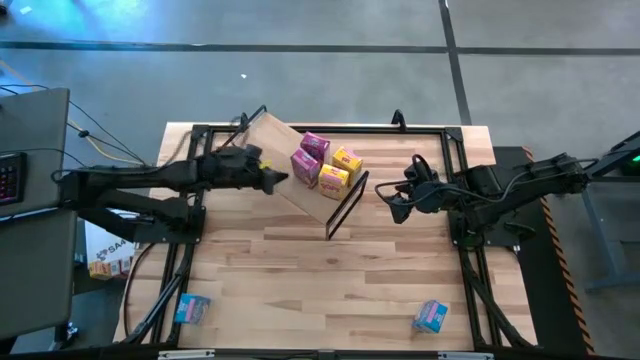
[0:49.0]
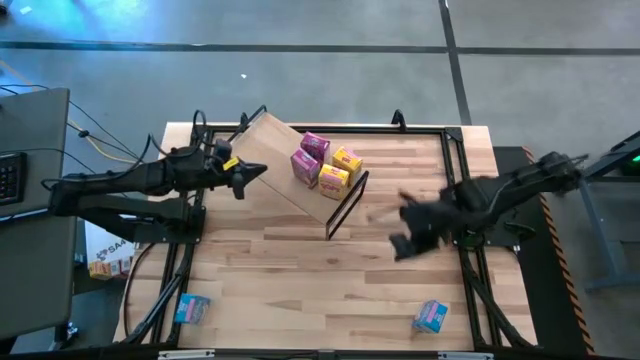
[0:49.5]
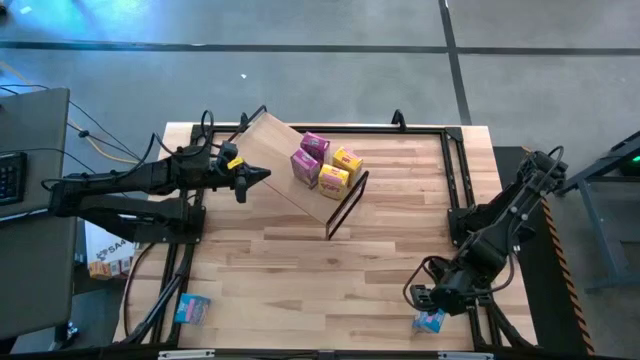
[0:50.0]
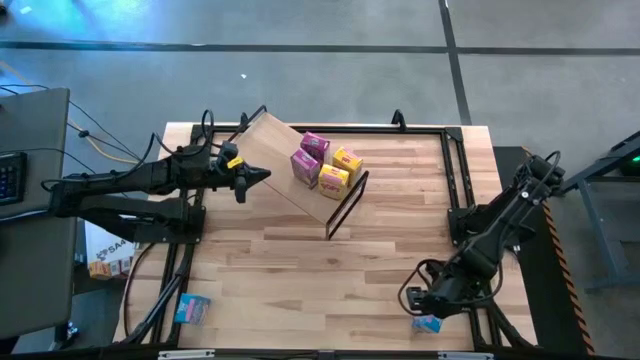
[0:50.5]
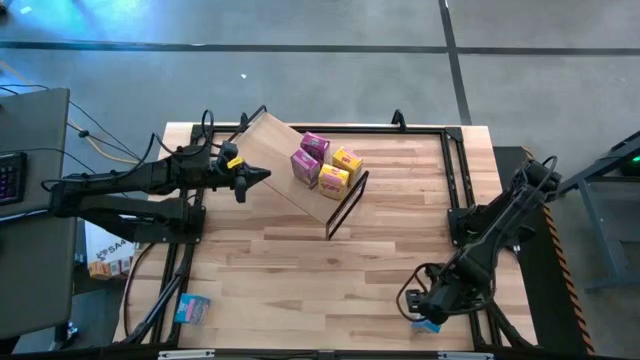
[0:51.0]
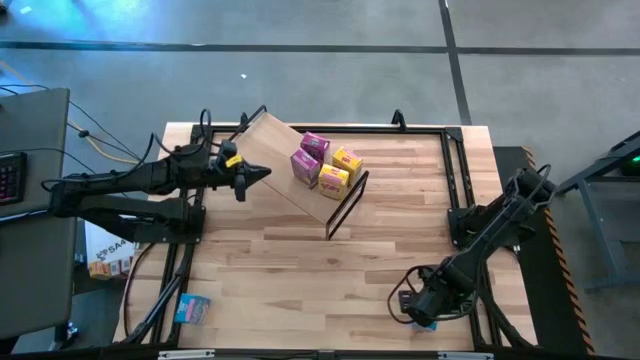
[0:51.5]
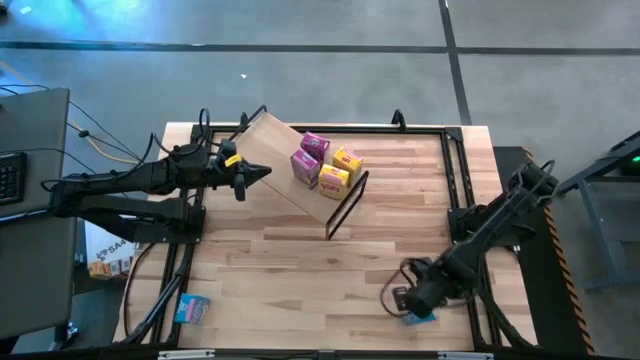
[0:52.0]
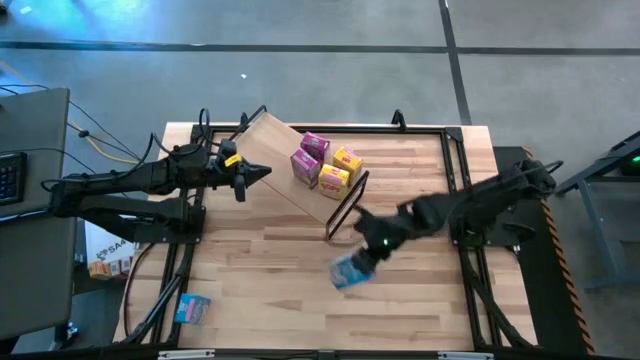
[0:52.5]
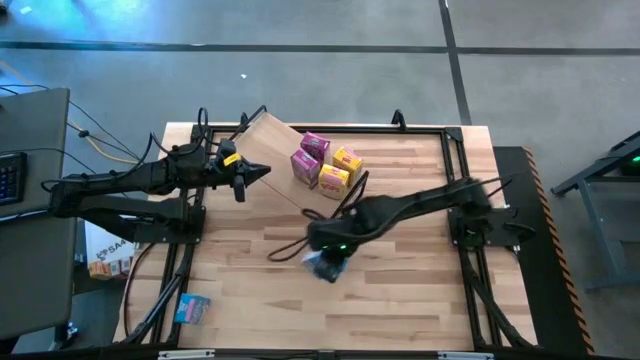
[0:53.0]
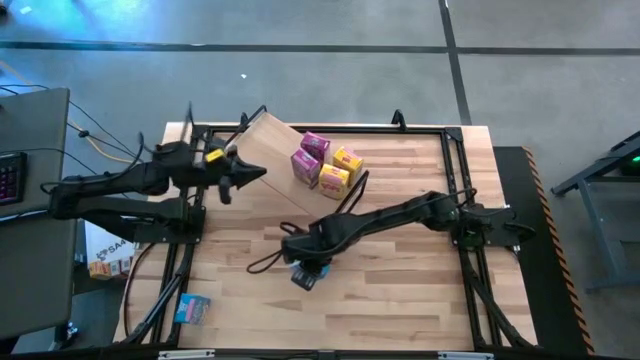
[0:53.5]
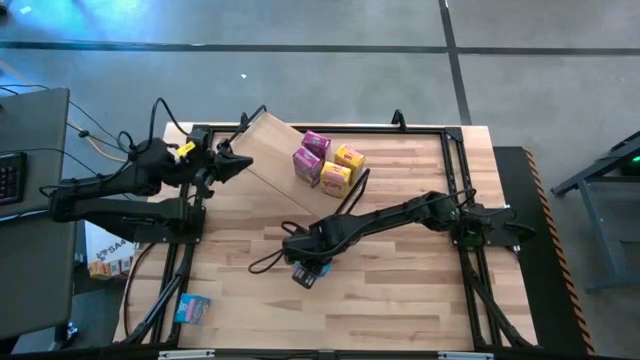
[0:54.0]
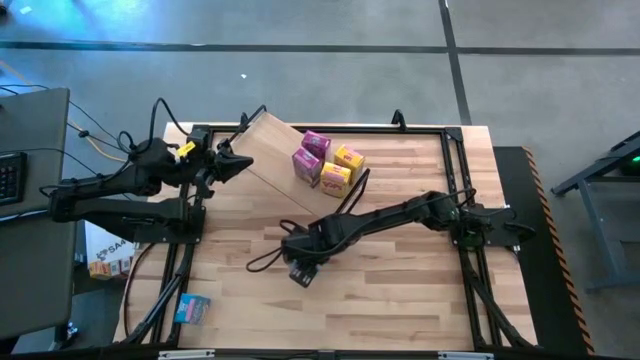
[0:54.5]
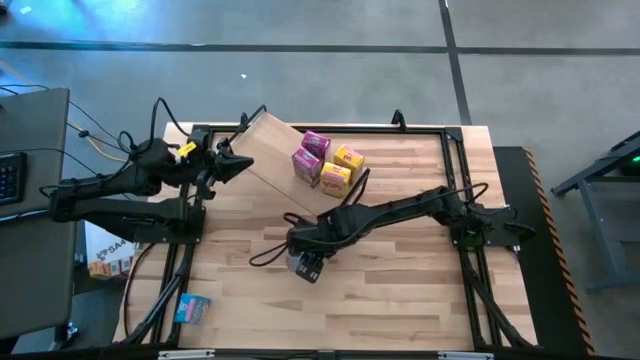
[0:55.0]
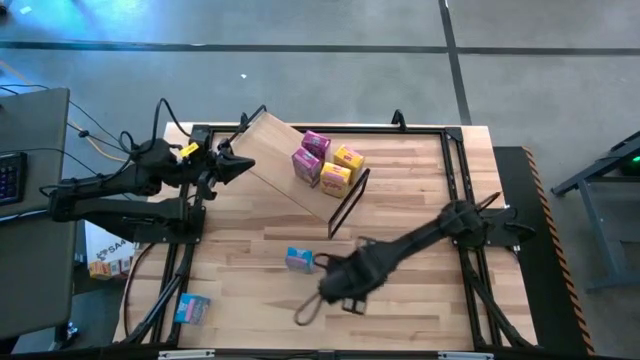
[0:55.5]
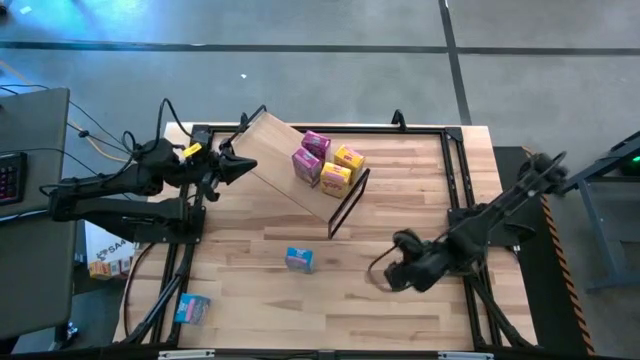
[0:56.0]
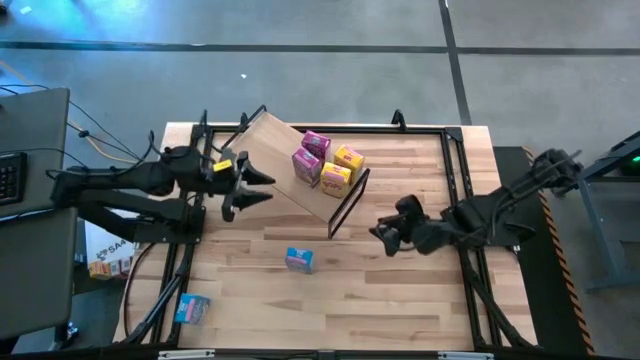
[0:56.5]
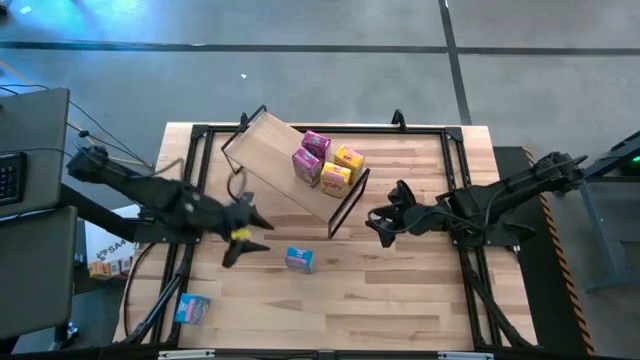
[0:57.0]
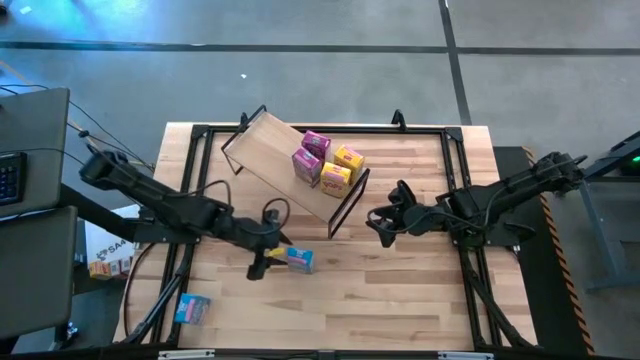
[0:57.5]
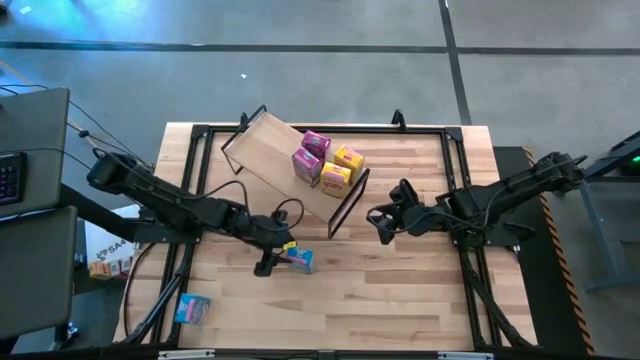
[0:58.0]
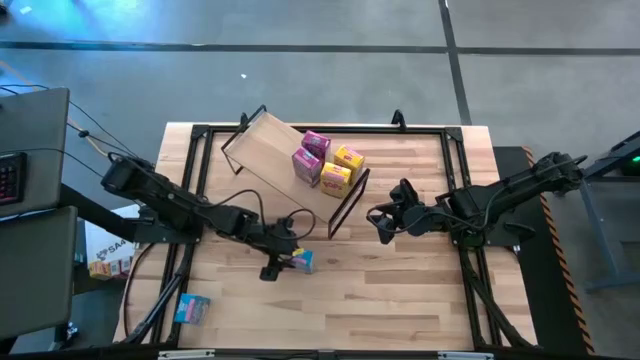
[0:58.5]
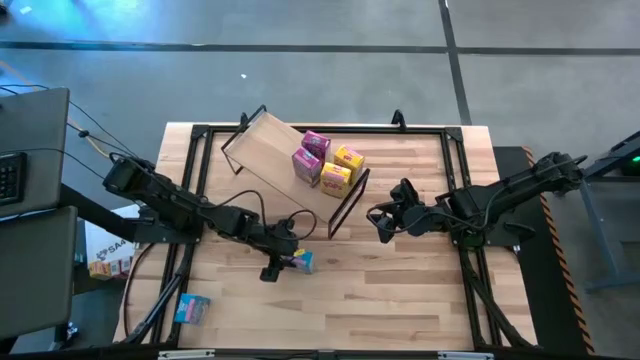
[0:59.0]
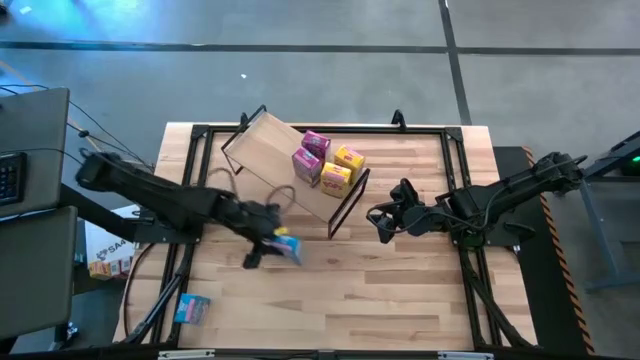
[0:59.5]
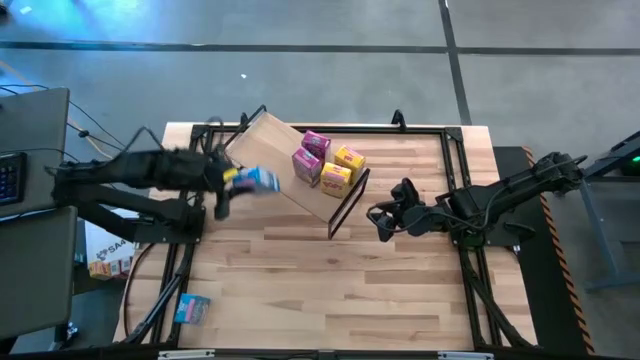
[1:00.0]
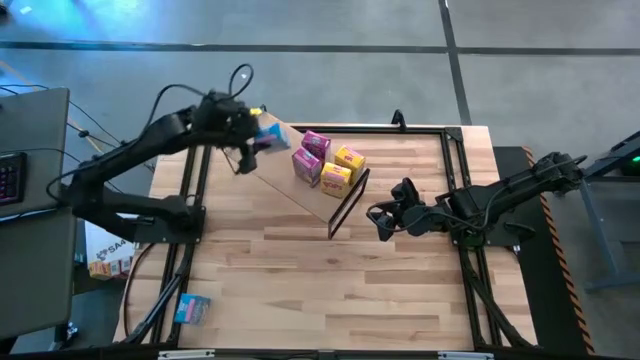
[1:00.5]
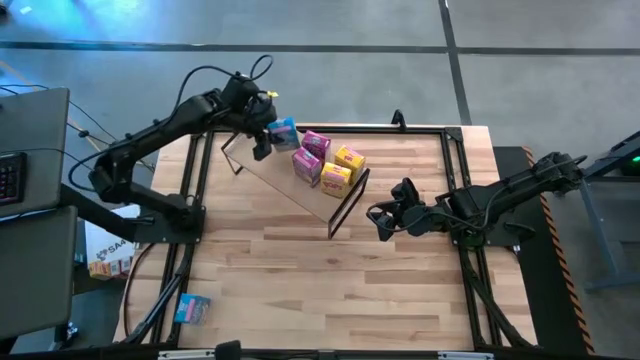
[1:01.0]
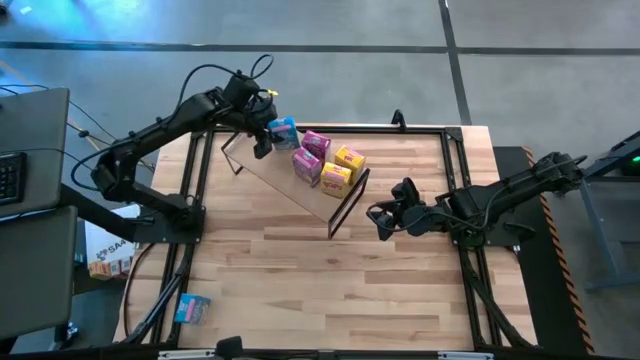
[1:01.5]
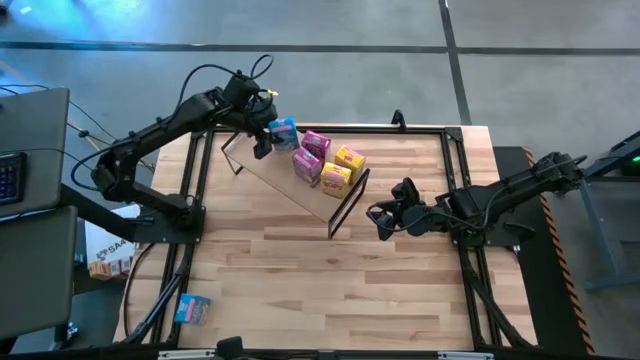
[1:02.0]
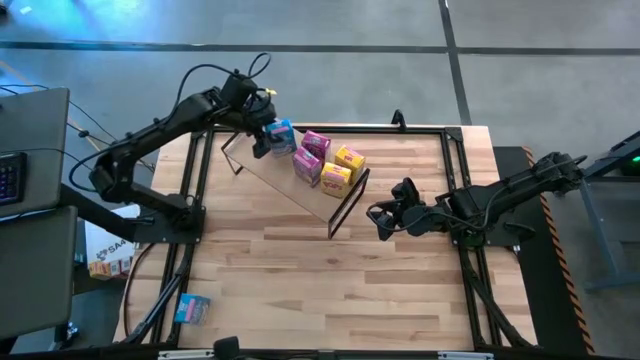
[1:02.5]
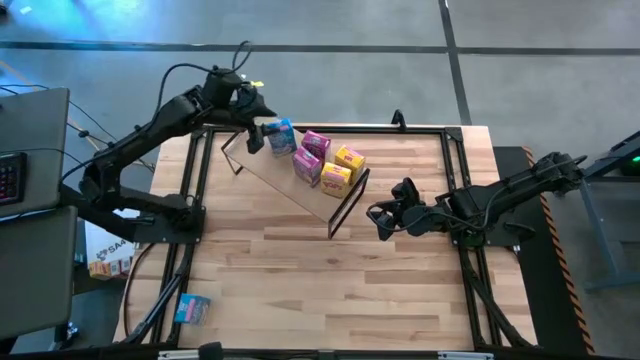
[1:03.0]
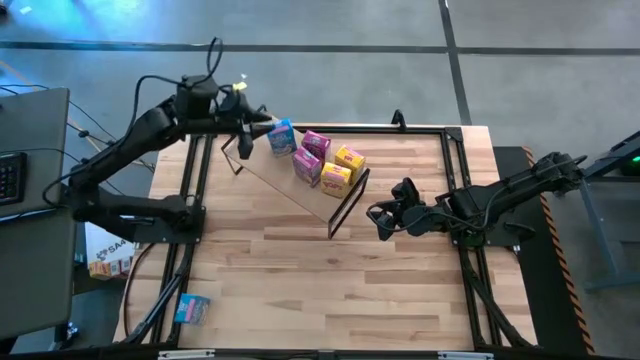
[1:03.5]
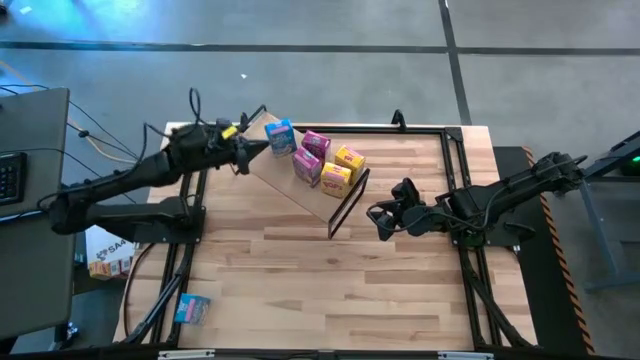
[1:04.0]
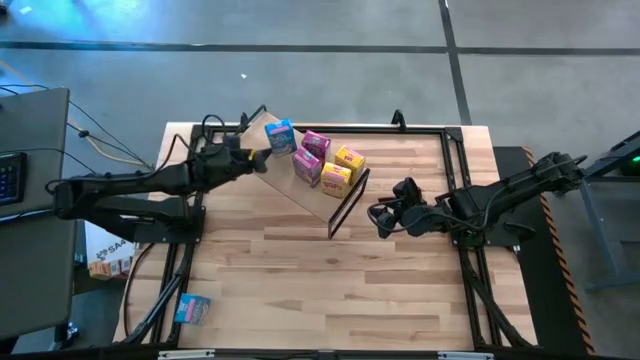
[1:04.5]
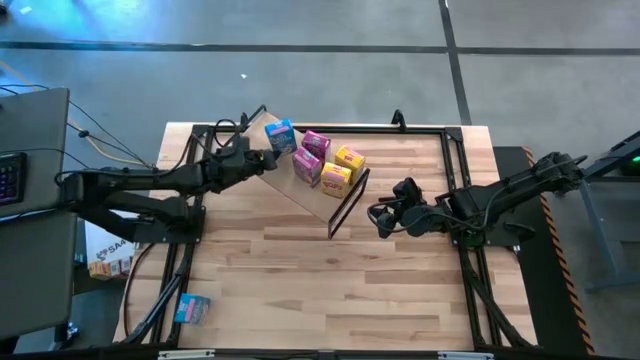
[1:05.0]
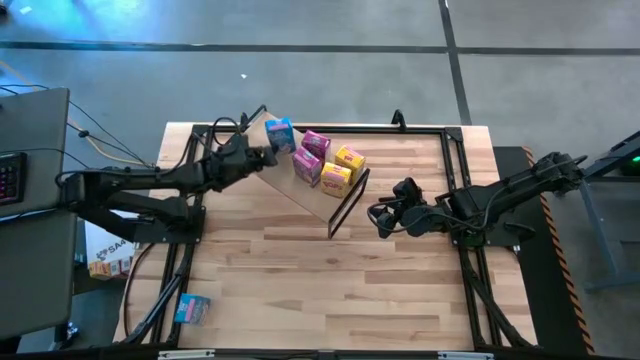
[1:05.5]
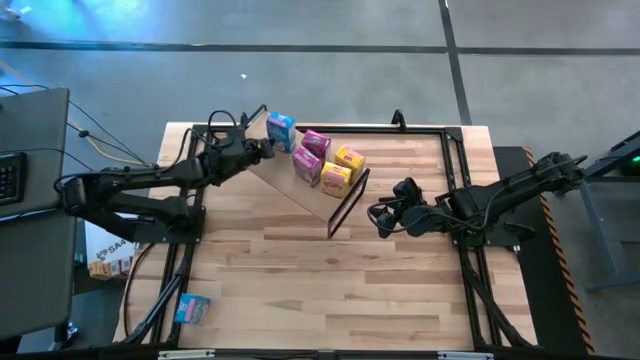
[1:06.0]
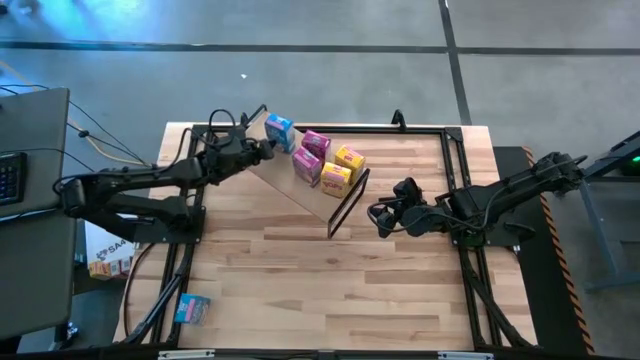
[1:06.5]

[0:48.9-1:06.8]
Task: Stack cereal on shelf
Put the blue cereal box on the shelf

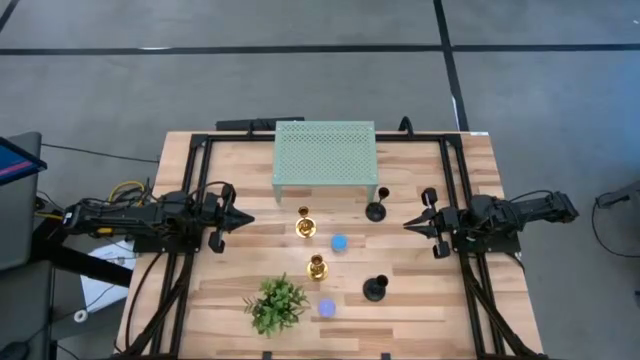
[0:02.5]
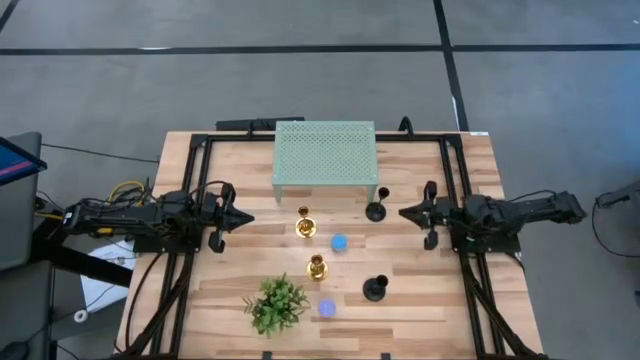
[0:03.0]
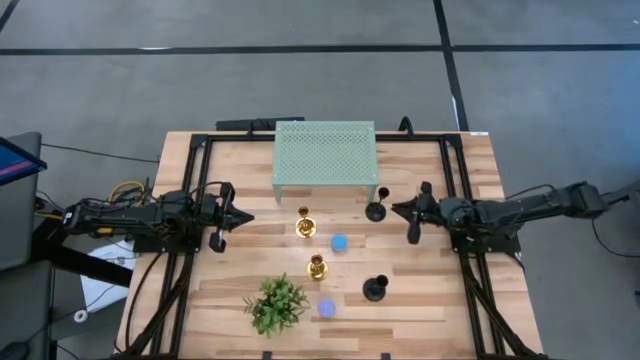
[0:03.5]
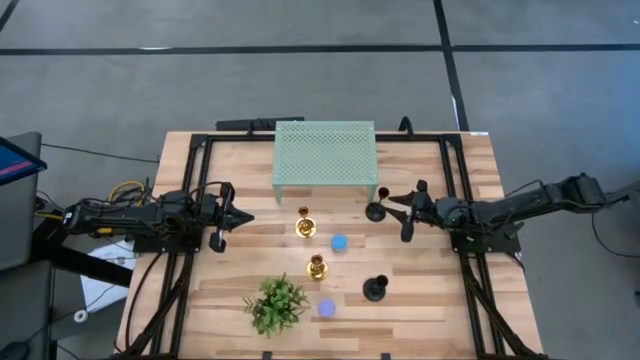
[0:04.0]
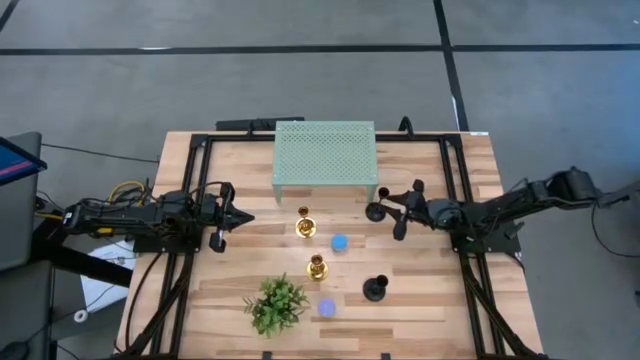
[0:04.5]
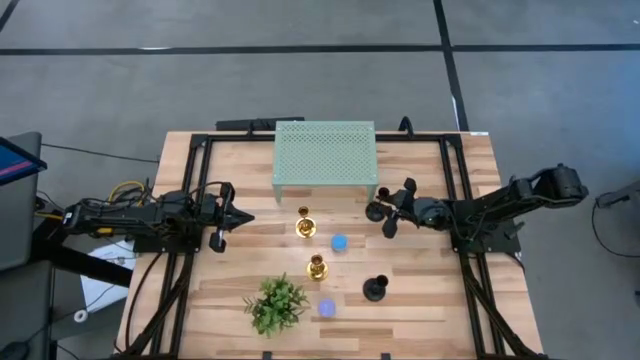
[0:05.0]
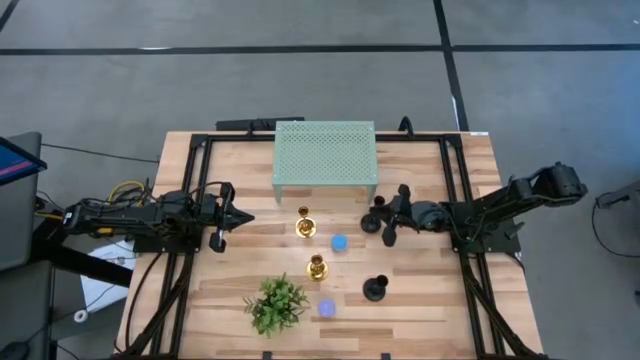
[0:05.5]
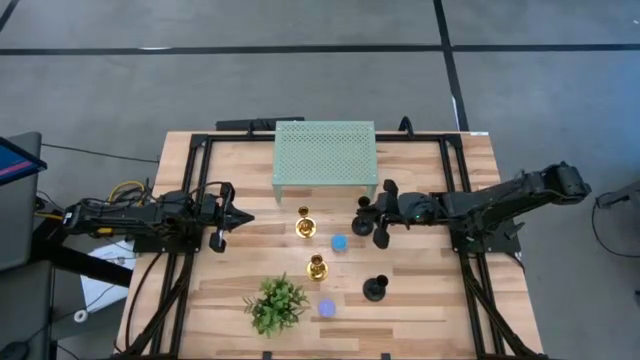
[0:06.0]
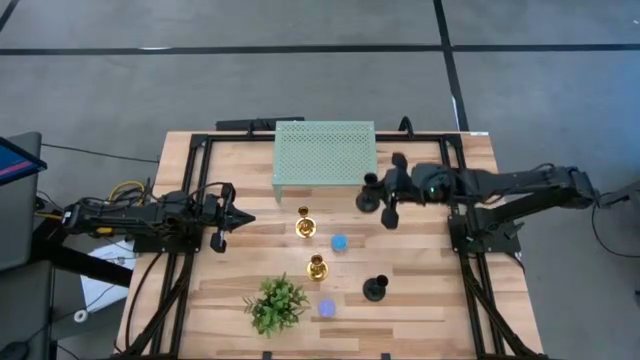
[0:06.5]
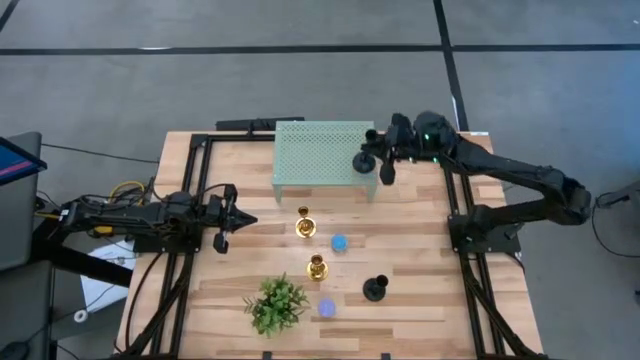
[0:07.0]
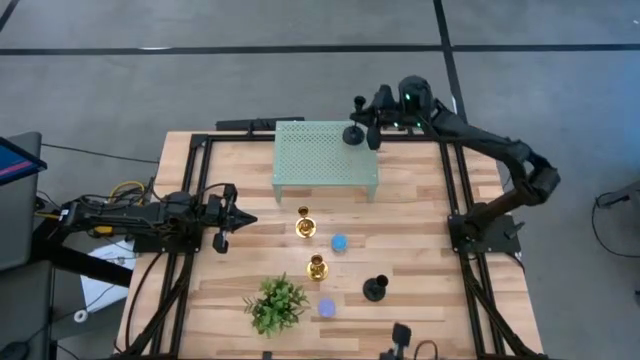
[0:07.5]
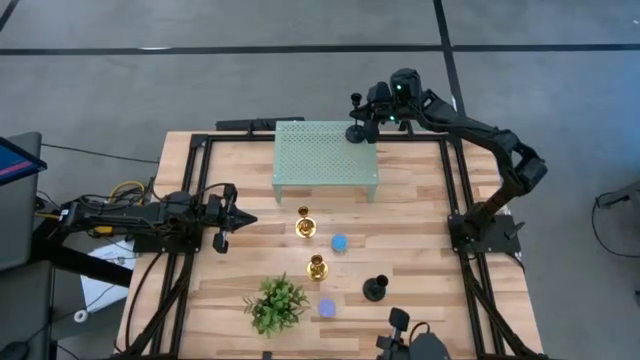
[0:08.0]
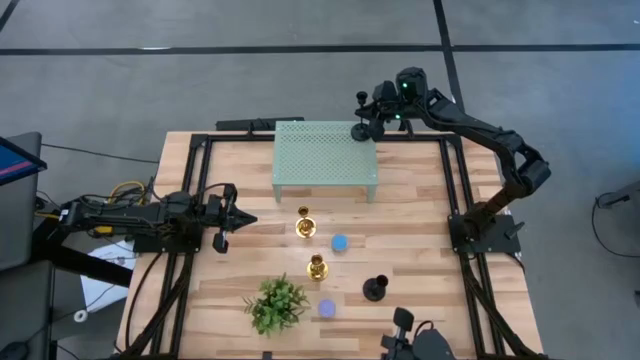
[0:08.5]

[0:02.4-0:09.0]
Task: Pick & Place candle stick holders
Put the black candlestick on the shelf
